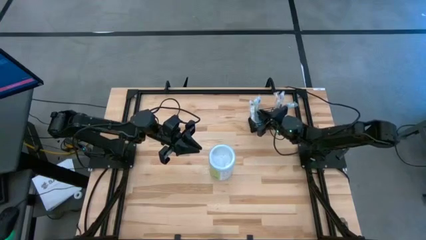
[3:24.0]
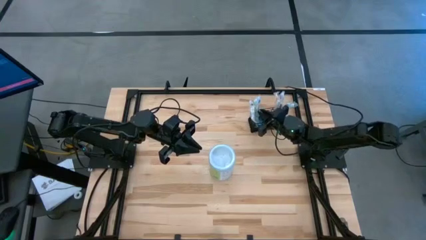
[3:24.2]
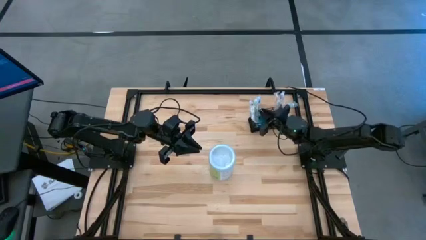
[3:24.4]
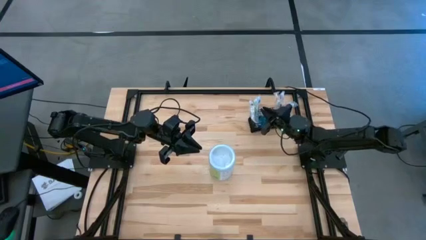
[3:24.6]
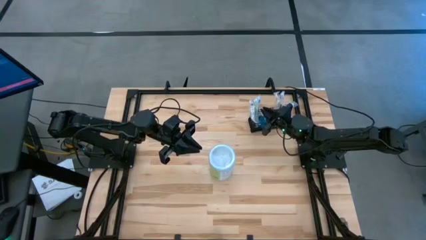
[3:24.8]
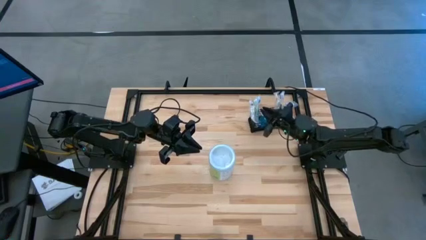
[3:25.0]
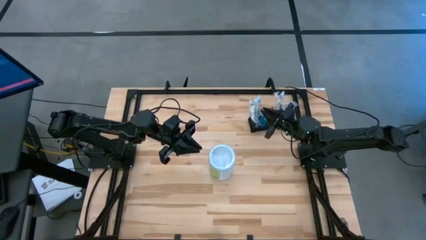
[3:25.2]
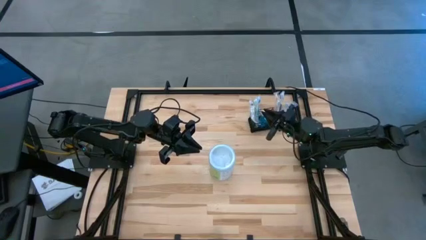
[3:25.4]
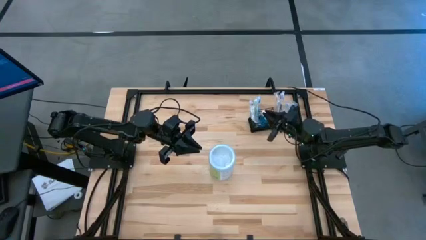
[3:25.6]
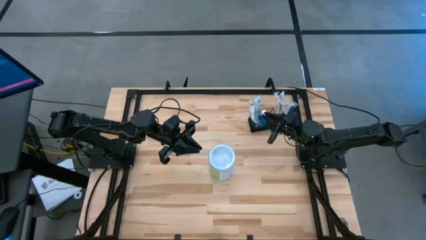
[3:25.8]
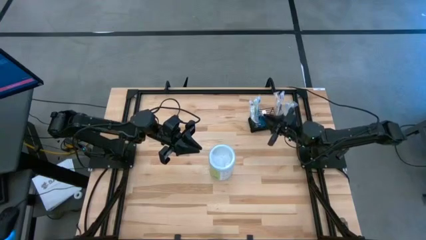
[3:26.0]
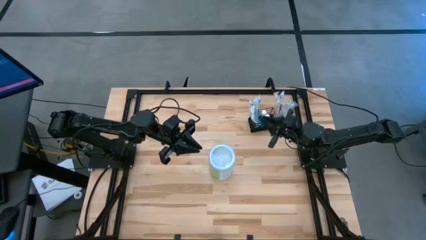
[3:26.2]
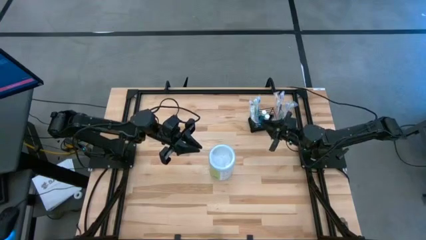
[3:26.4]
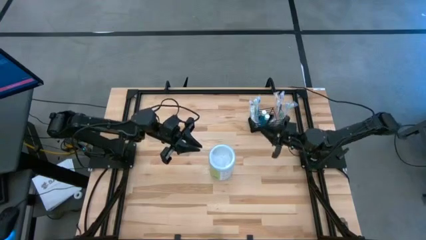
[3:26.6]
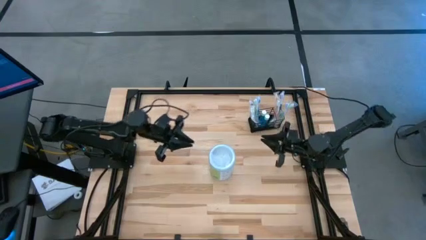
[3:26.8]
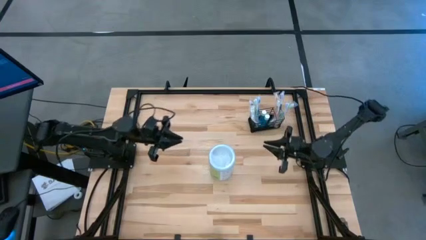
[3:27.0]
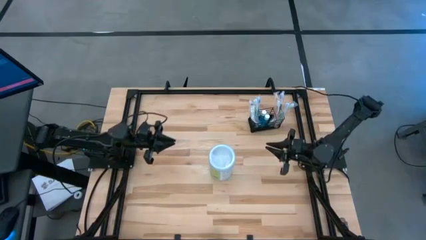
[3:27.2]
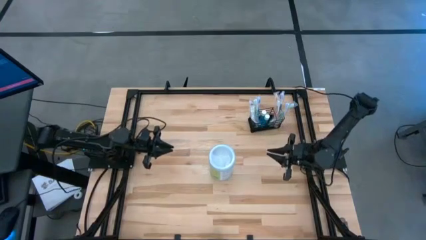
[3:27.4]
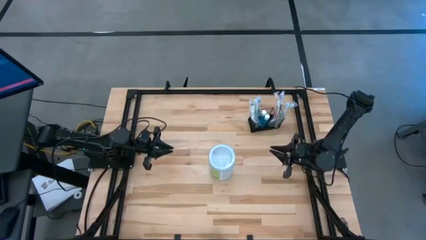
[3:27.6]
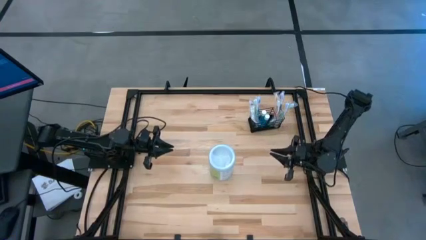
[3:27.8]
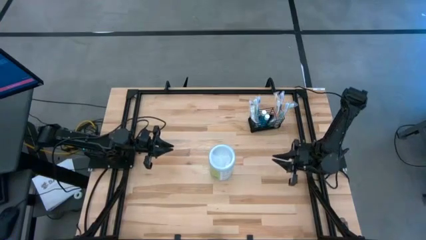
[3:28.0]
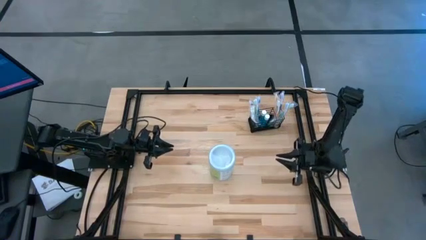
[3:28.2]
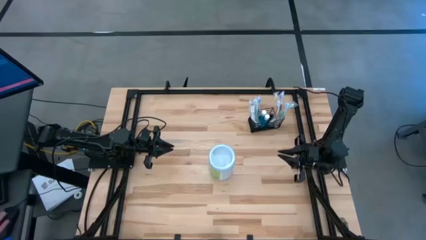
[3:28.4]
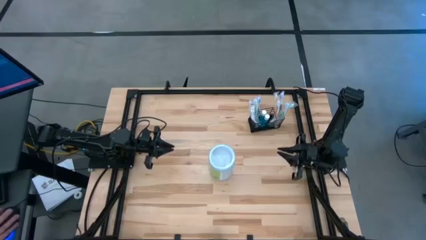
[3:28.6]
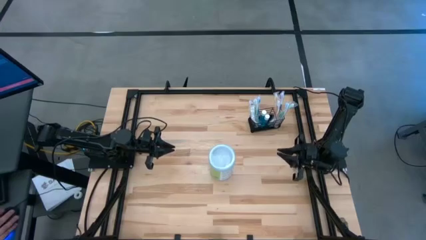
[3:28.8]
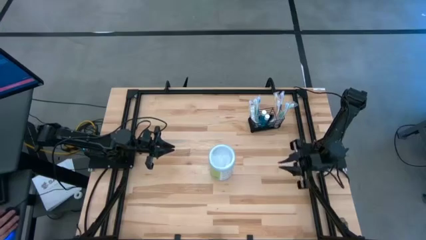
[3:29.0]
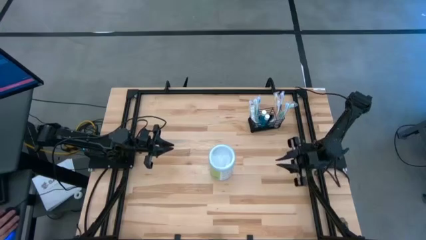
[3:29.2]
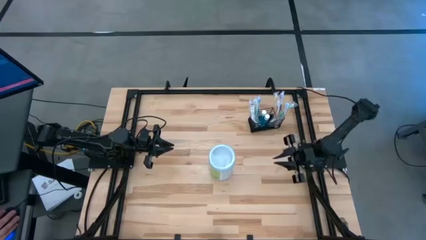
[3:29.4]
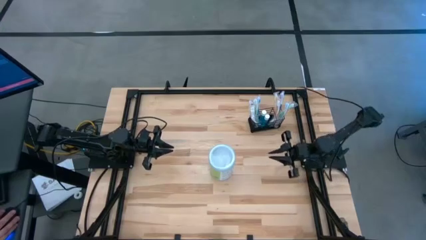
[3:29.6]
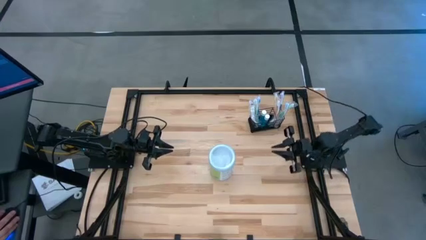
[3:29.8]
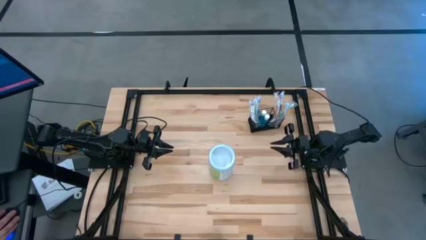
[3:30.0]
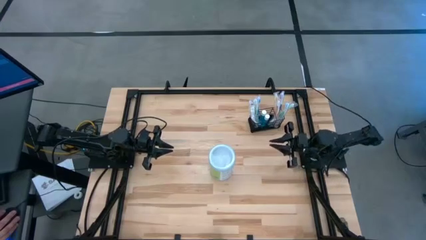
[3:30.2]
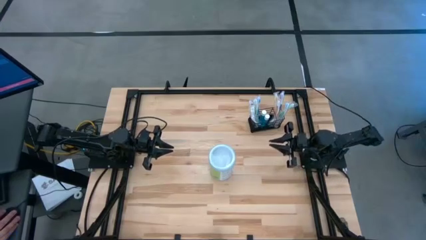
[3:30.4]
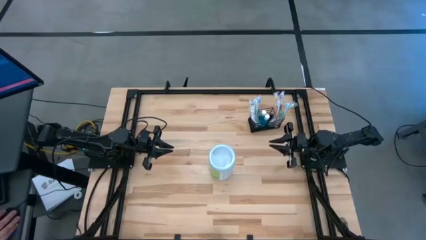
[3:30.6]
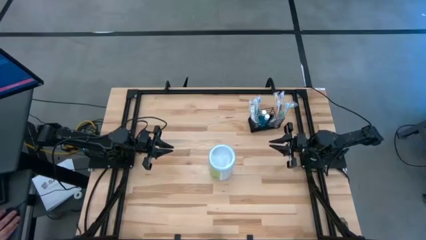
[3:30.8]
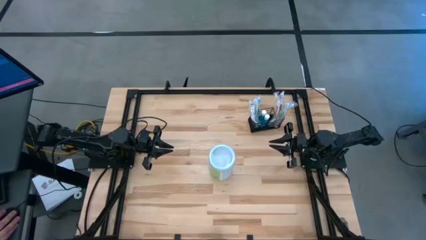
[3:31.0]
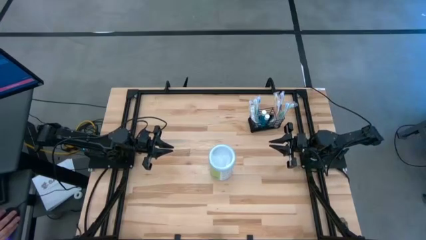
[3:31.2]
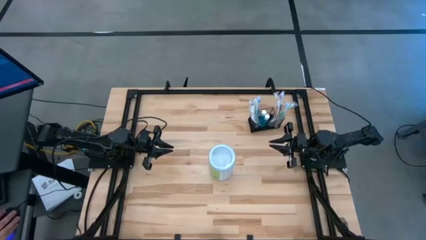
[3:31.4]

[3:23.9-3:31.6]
Task: Pick & Place toothbrushing station
Return to Home Position

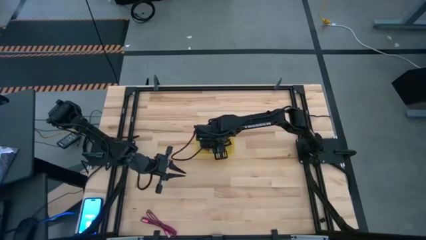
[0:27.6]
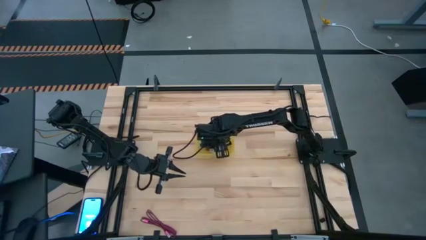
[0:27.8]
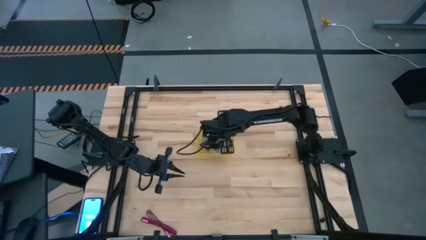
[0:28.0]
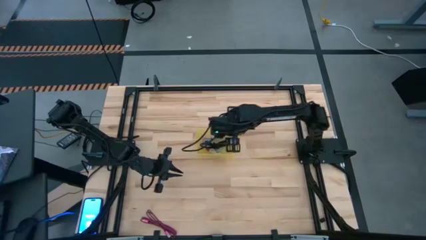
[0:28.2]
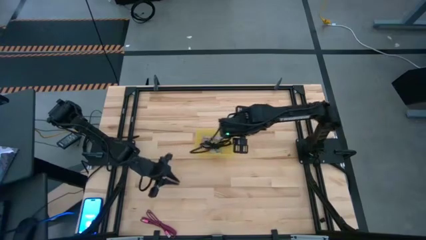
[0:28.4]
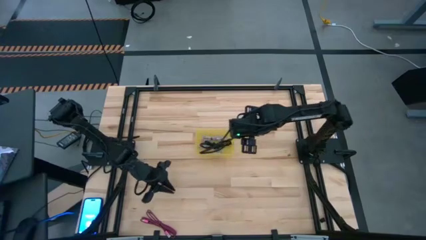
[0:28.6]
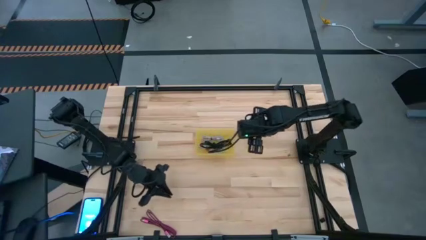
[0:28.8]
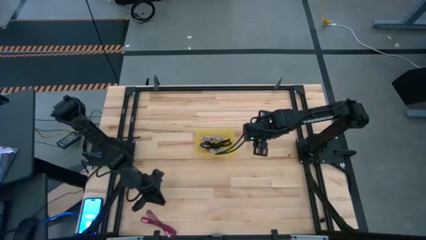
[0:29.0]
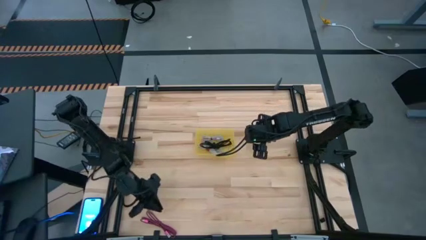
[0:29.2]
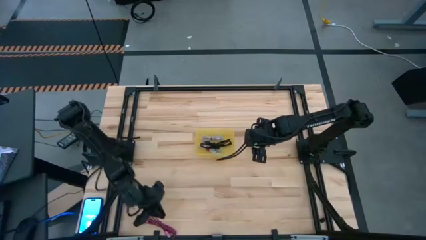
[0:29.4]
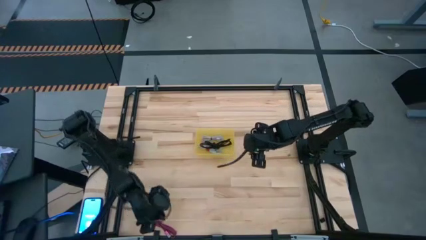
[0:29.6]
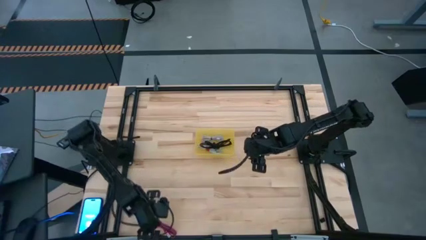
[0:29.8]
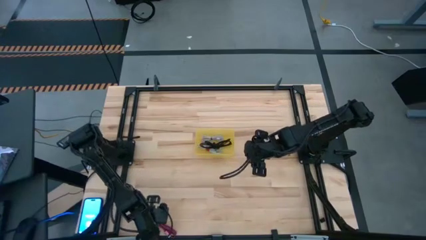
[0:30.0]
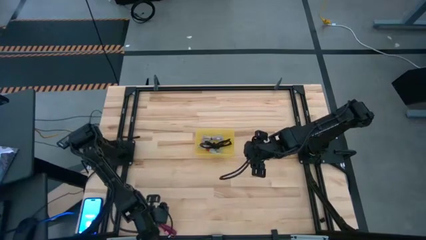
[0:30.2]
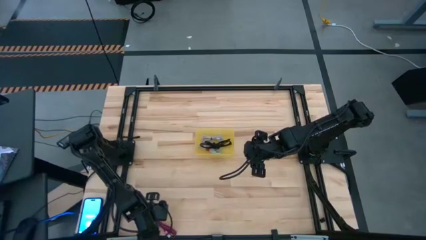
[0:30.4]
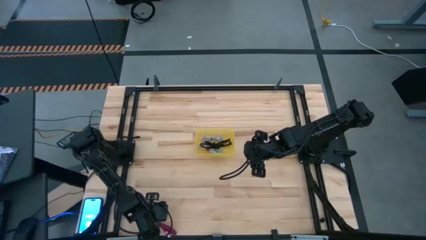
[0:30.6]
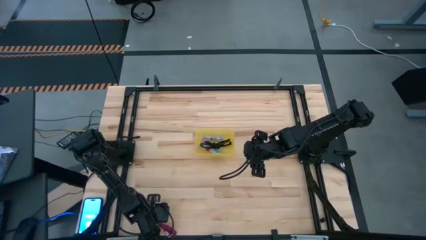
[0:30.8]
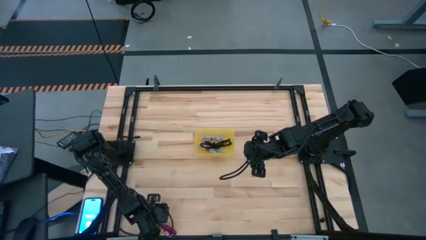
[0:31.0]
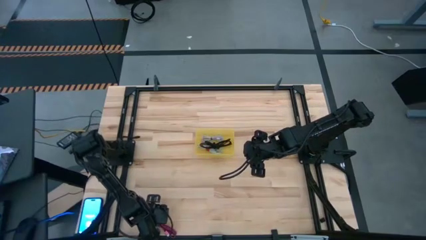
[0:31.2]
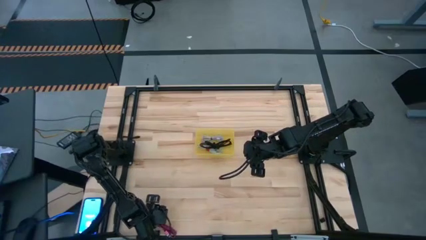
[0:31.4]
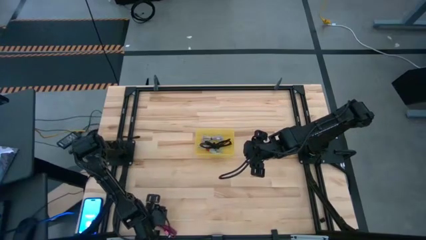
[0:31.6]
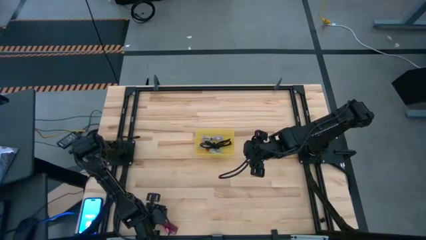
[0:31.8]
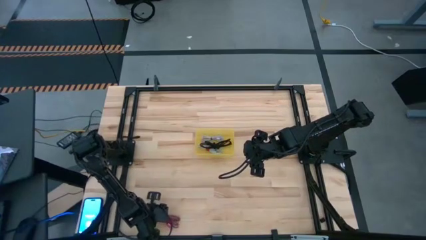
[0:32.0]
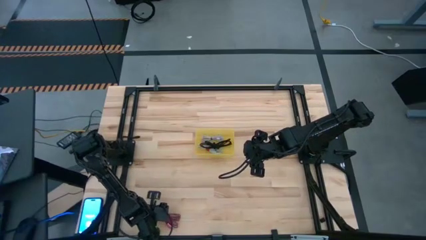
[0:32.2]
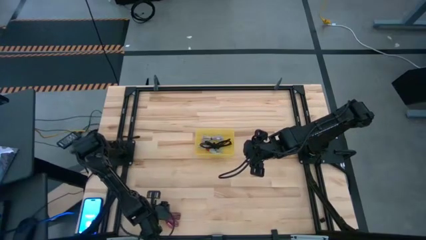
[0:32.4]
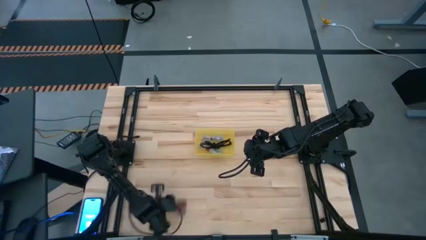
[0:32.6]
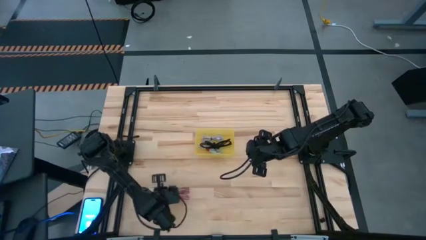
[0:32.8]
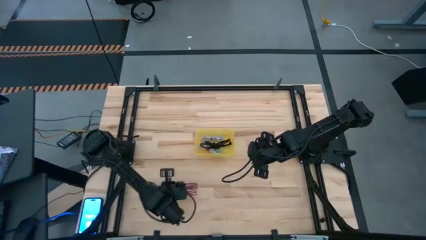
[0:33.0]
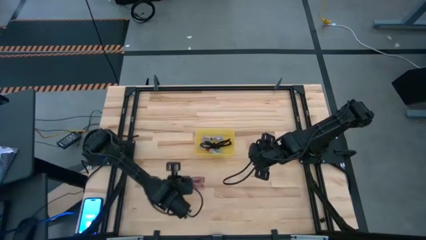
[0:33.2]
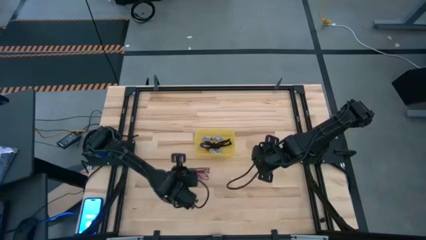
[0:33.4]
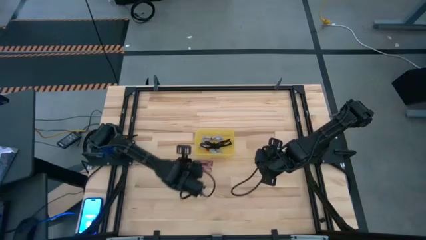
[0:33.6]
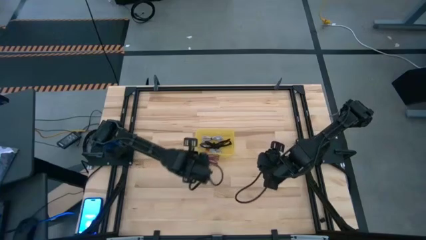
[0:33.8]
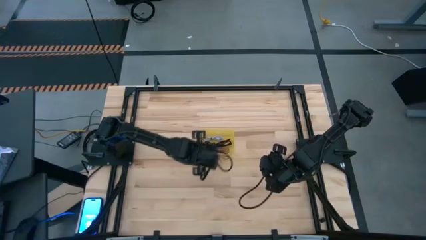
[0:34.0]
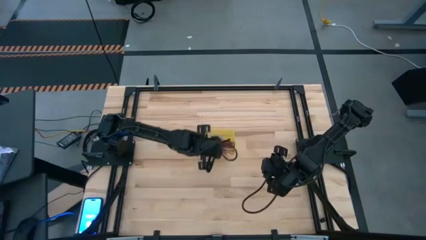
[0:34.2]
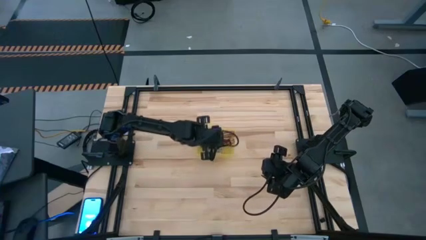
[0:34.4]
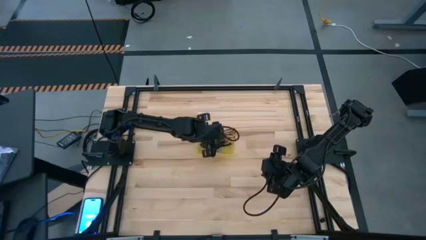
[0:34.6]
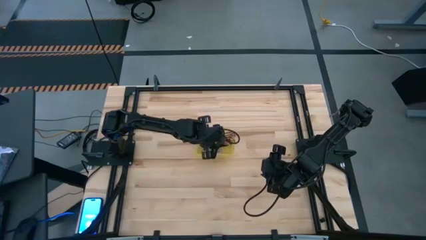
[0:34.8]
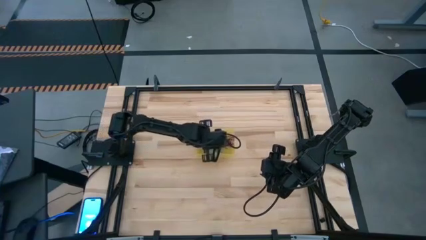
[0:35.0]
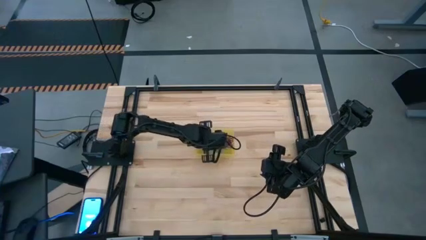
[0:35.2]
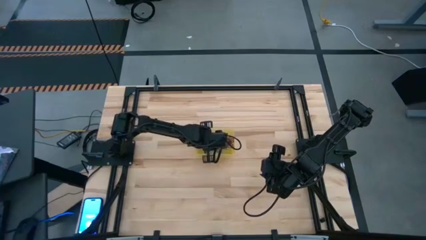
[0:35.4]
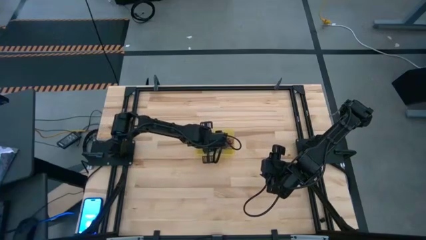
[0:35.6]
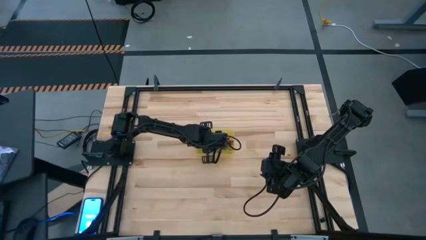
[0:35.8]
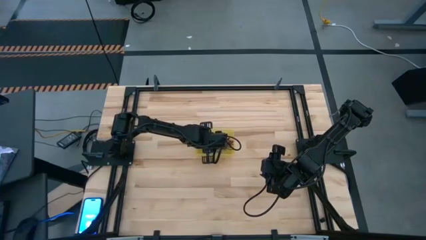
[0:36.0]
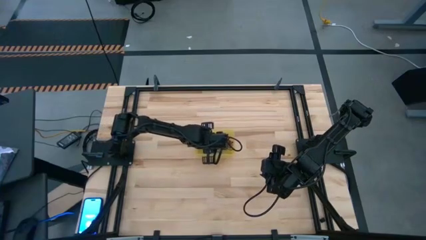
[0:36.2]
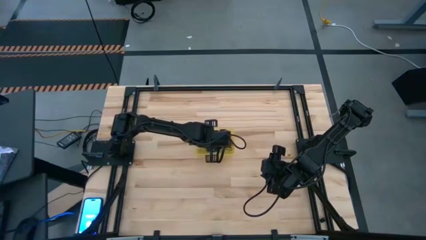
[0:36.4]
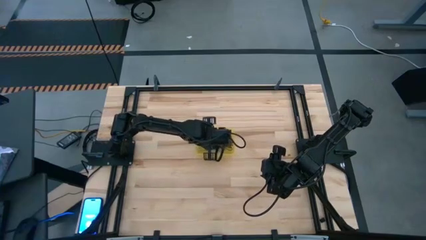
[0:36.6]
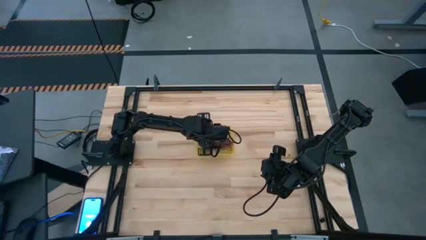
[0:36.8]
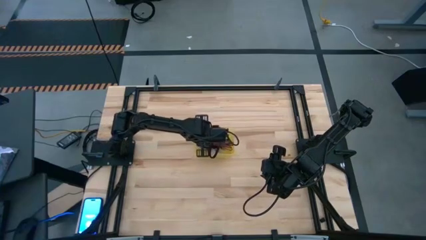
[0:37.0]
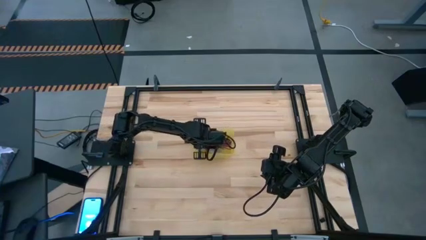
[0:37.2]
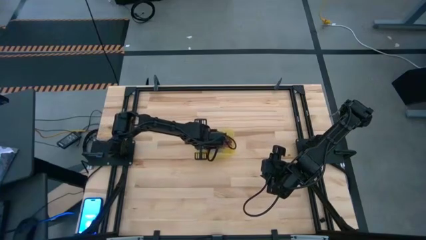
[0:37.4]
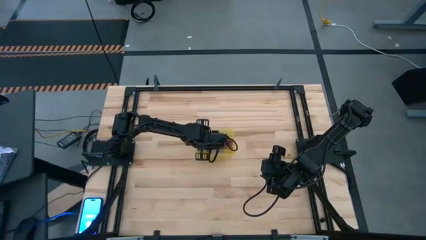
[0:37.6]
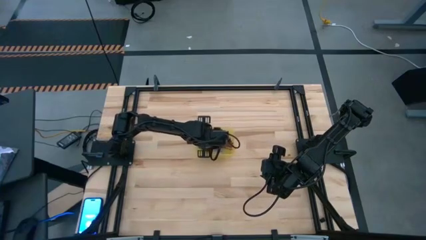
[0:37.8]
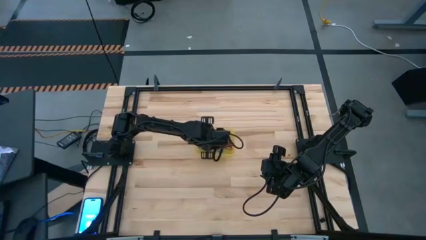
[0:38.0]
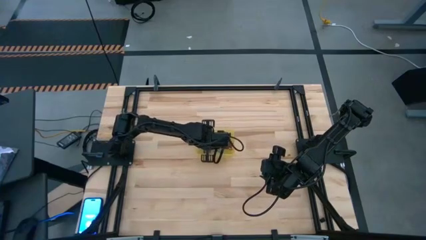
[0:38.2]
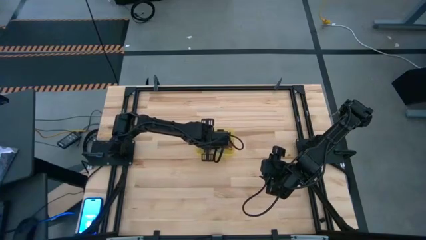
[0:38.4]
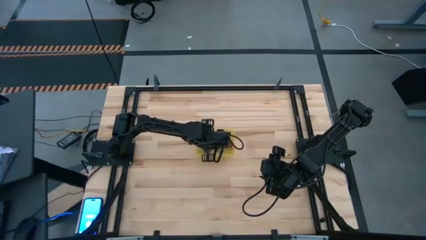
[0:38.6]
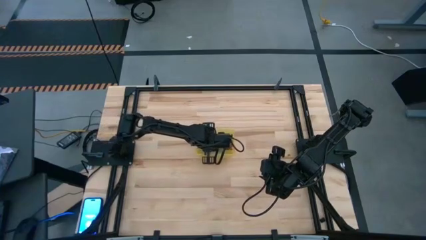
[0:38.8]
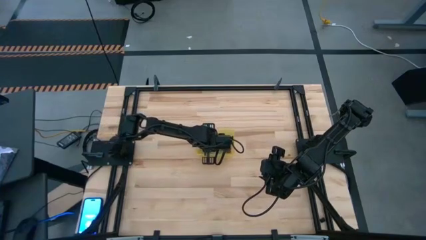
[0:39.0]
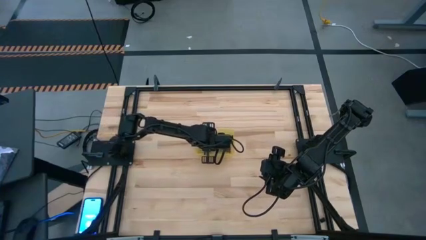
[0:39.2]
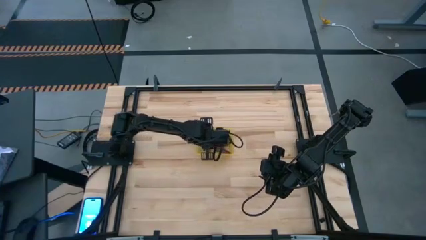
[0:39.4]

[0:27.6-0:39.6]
Task: Pick and place USB-C Cables
Put the red charger cable into the yellow transparent bin
